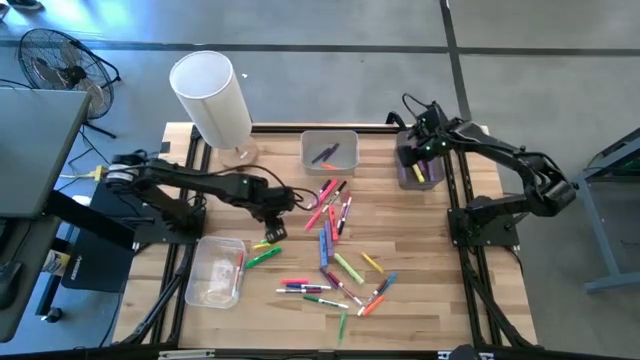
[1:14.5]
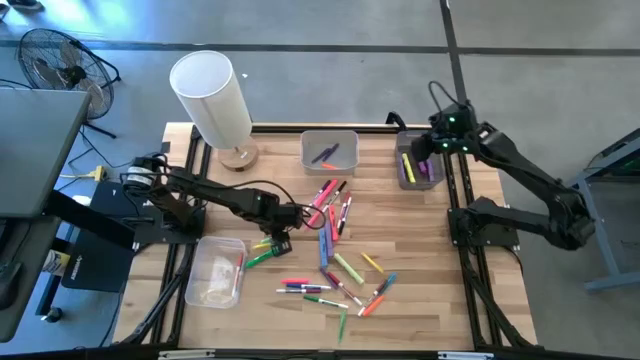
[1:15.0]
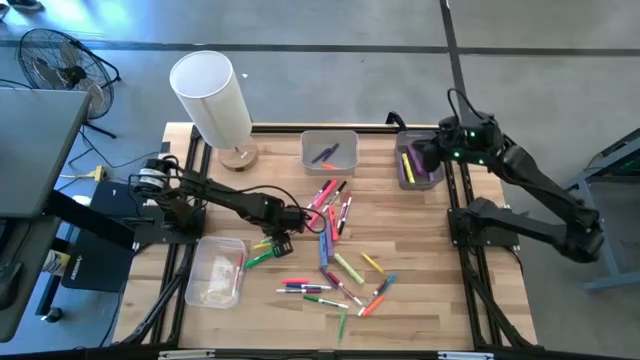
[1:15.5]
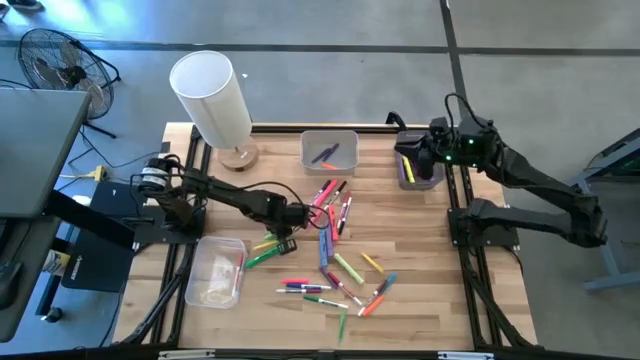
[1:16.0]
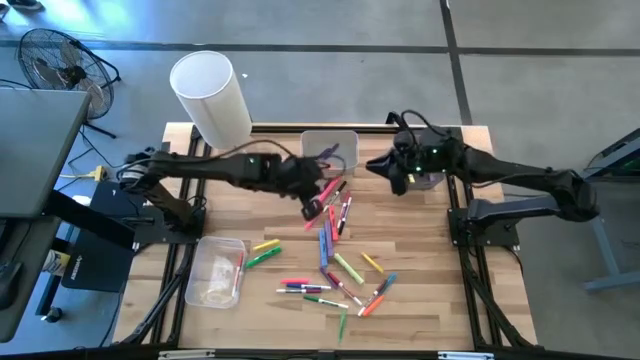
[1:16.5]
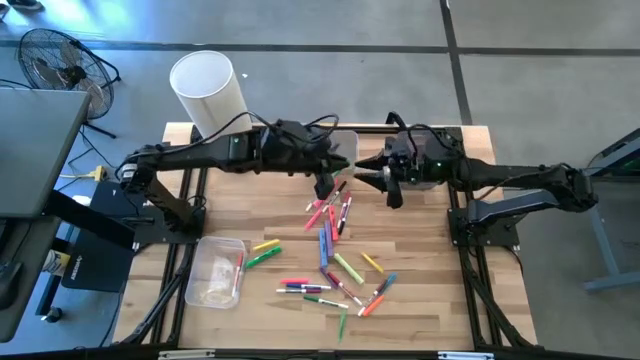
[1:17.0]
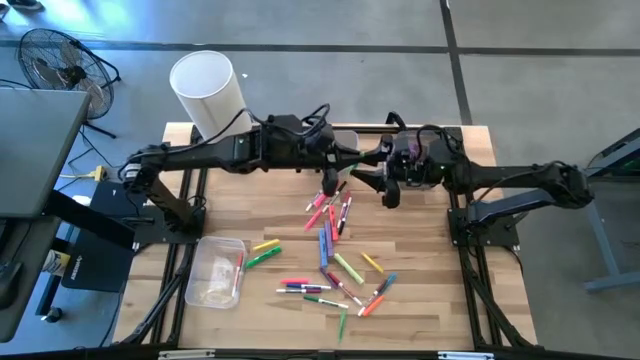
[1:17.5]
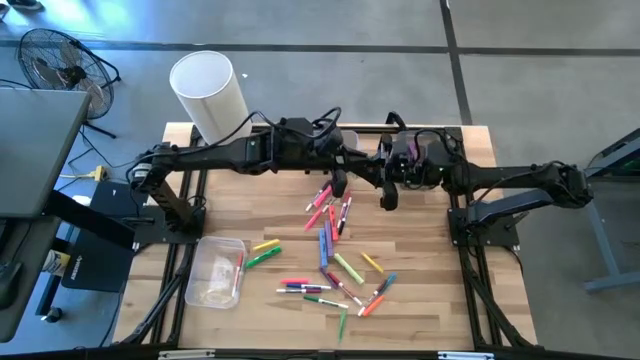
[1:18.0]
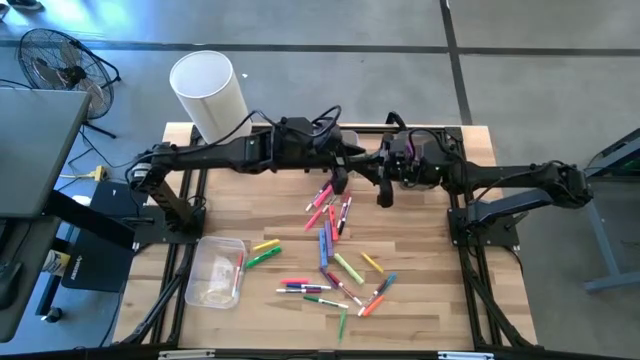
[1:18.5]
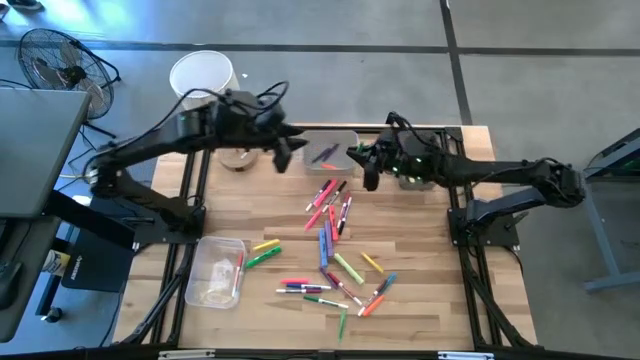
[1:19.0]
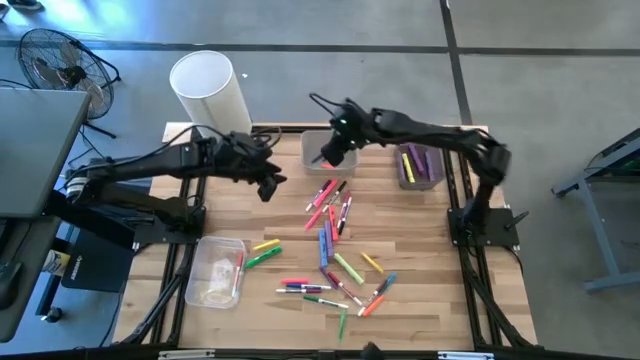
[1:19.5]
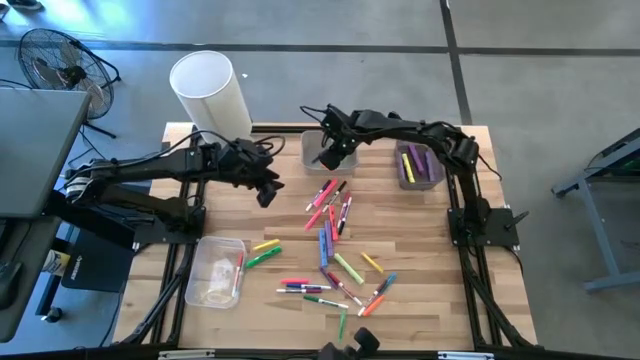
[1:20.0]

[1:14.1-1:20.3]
Task: Pick & Place Markers
Put the green pen into the white bin

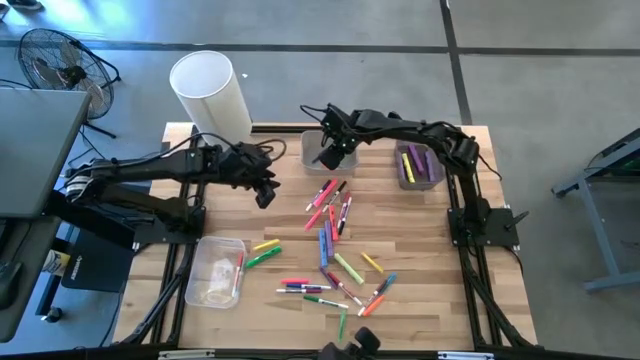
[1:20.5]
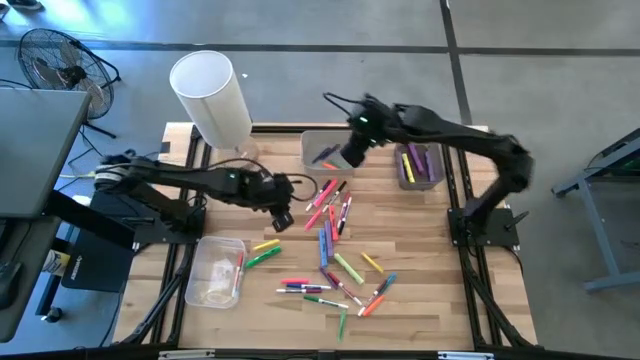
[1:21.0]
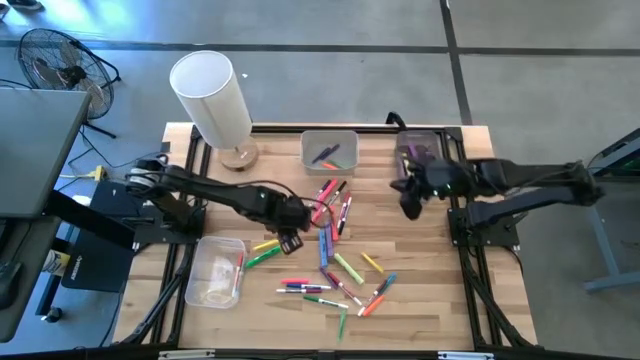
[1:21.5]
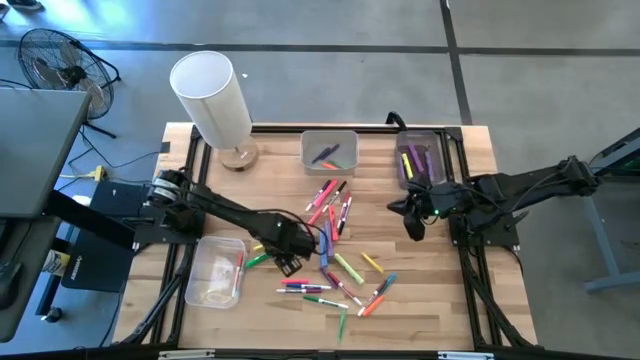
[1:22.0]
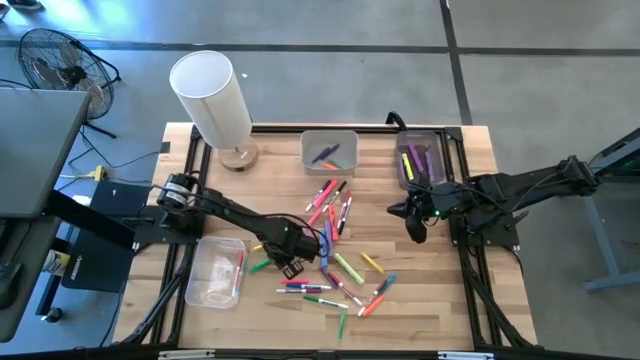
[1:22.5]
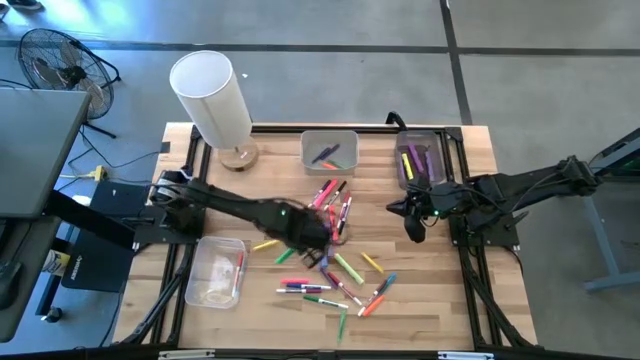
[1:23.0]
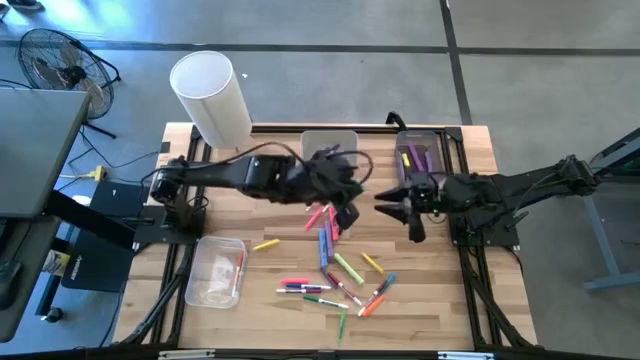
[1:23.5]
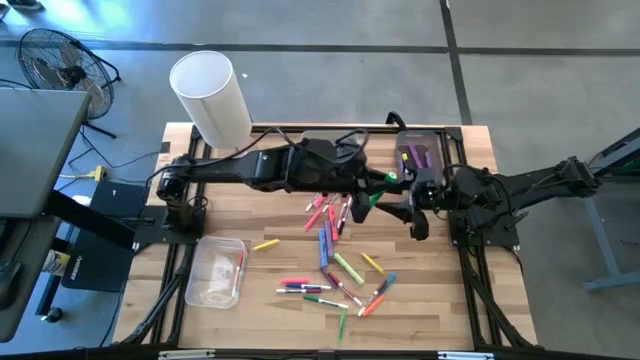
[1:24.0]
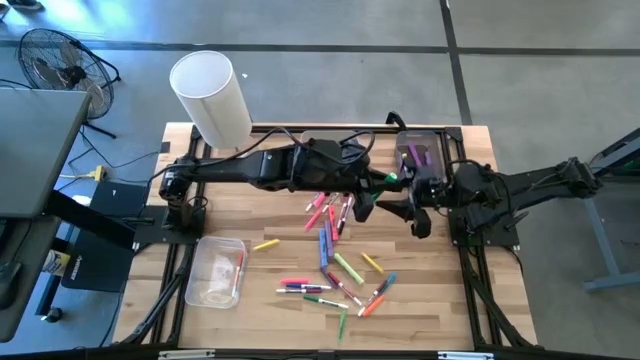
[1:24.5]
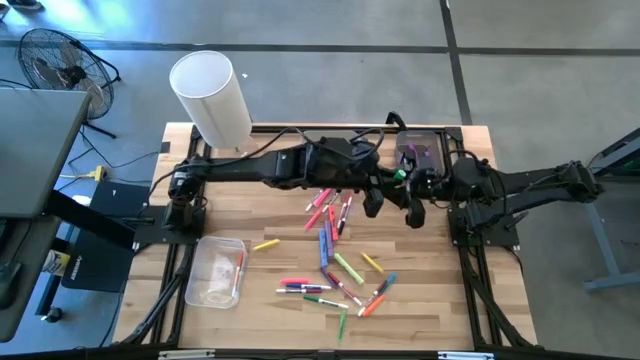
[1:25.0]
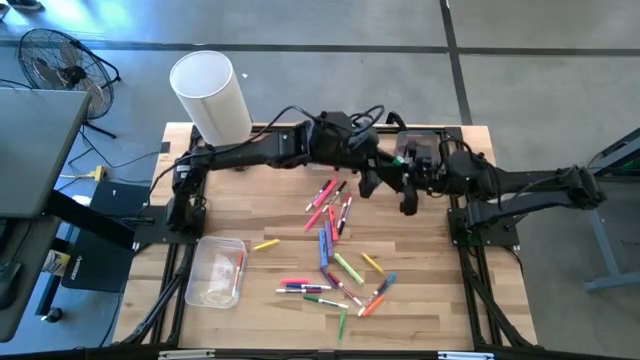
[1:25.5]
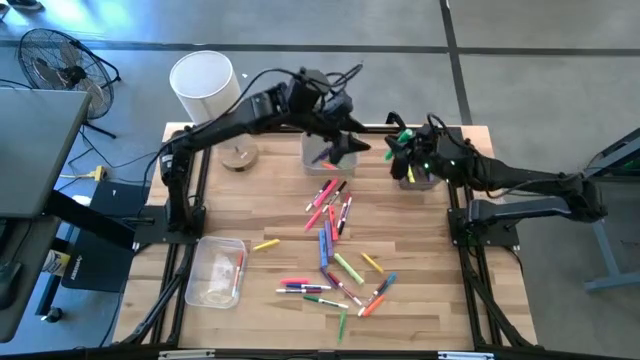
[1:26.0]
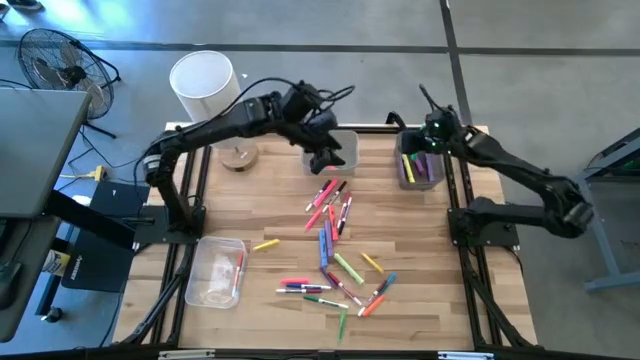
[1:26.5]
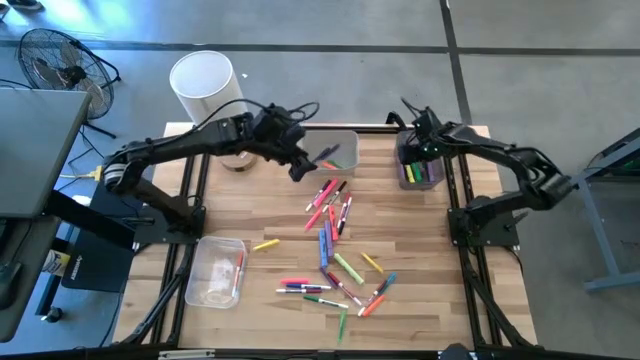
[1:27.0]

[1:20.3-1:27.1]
Put the green highlighter pen into the black bin

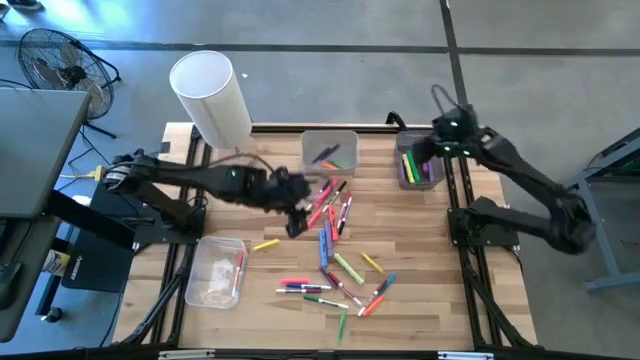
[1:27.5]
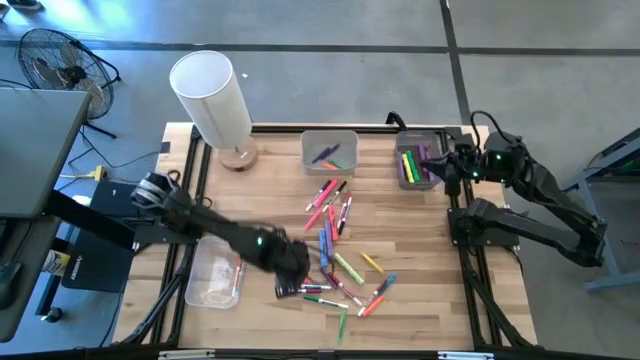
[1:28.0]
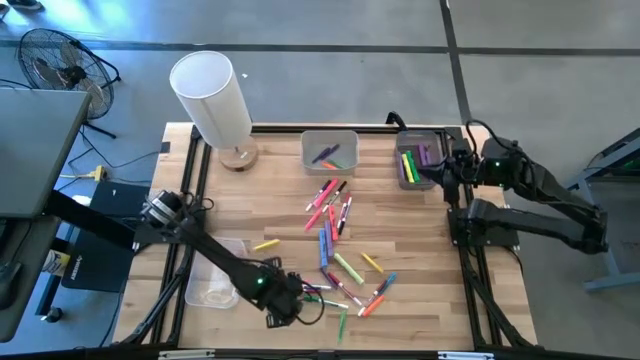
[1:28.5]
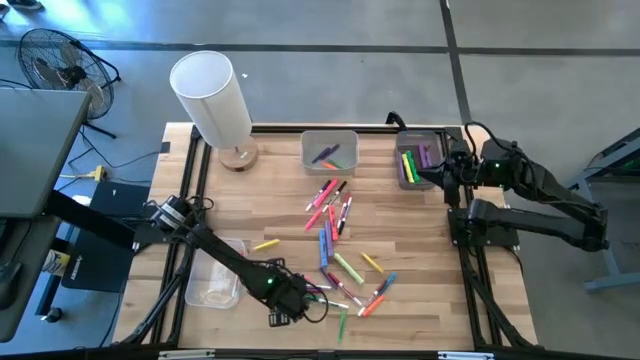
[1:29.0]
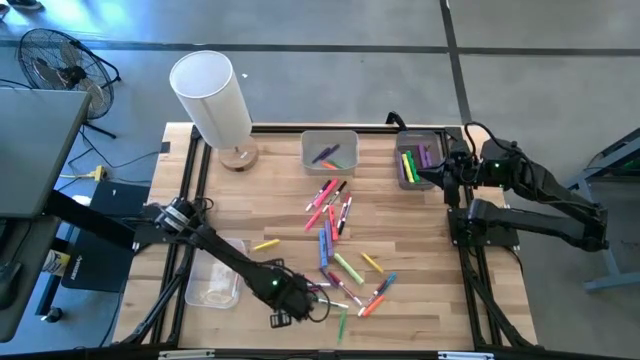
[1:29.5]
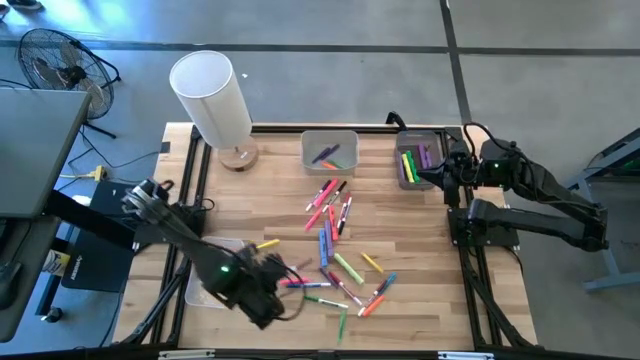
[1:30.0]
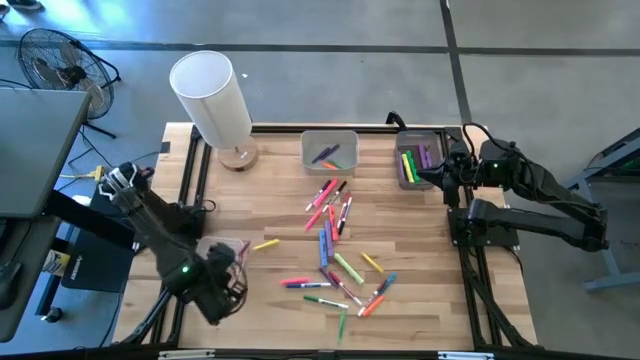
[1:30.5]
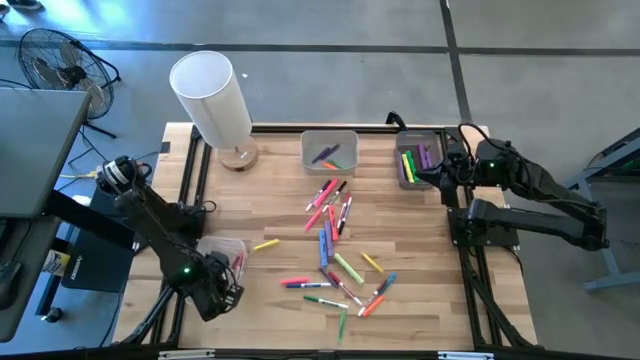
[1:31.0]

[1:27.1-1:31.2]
Put the purple marker pen into the white bin

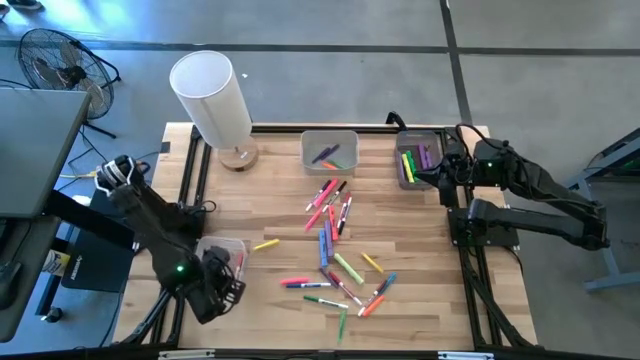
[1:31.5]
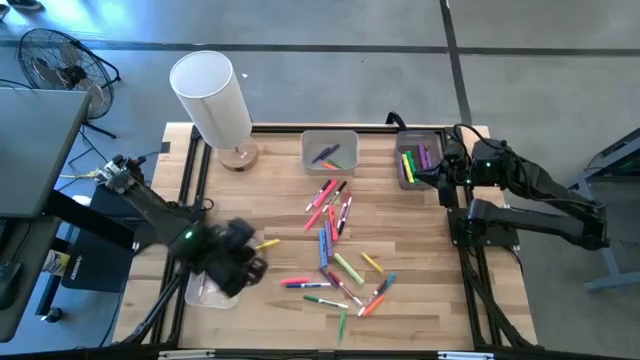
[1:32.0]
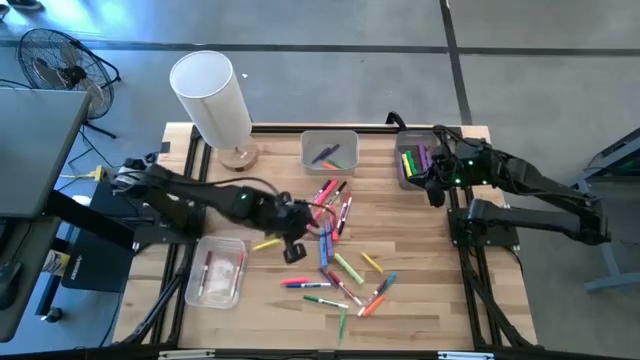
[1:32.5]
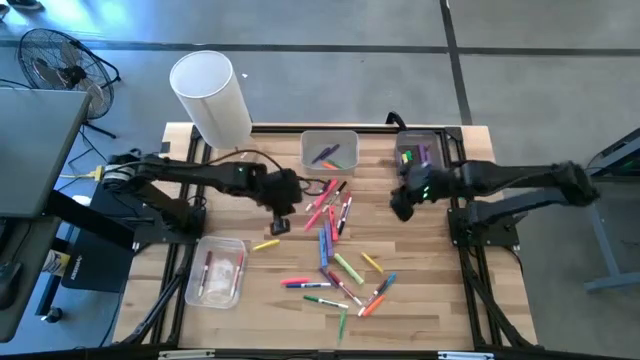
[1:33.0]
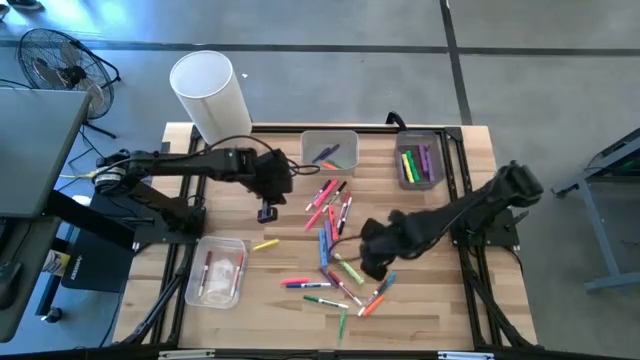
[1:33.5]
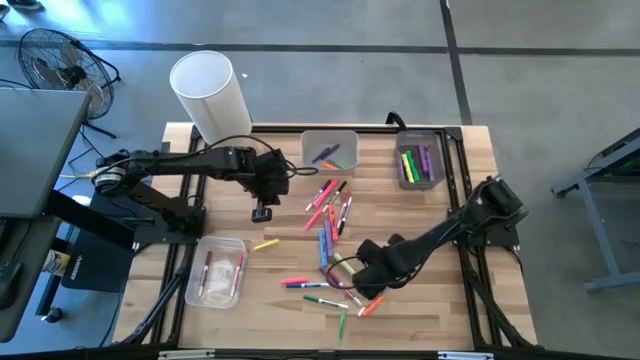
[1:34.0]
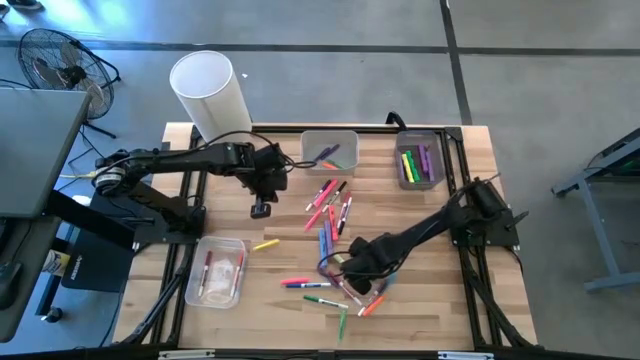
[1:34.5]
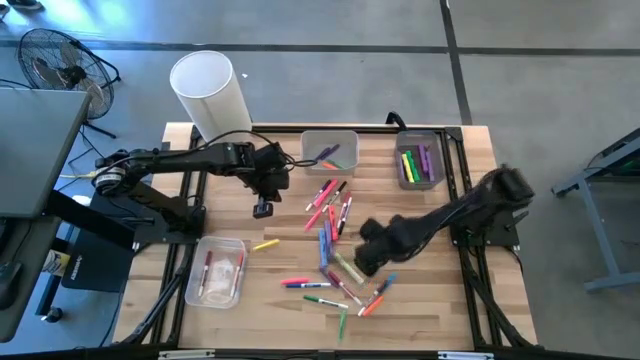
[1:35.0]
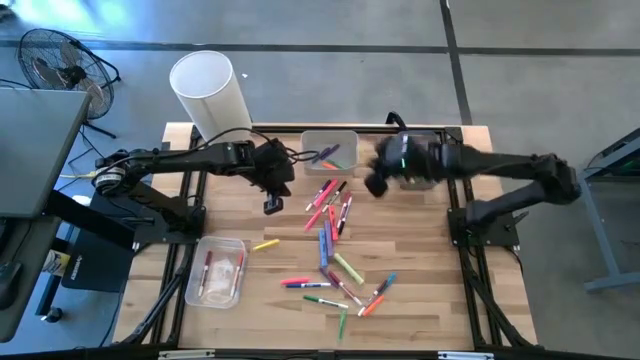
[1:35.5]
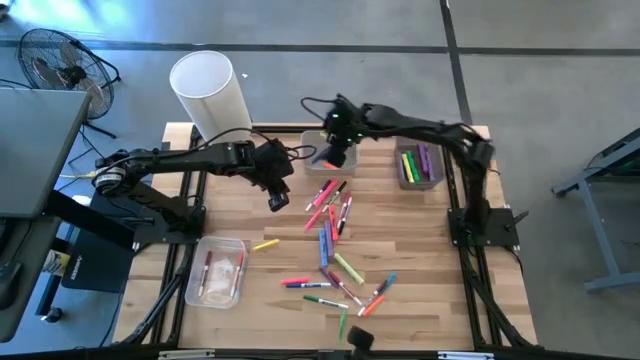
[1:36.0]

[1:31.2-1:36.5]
Put the yellow pen into the white bin
